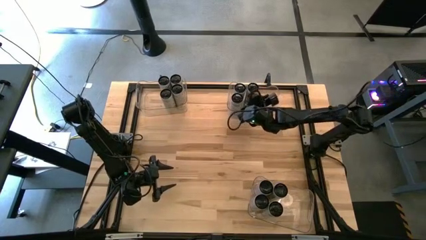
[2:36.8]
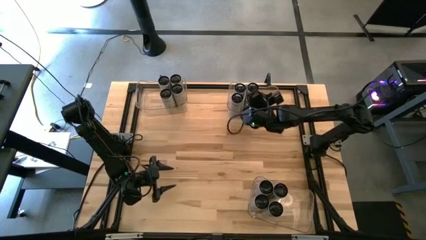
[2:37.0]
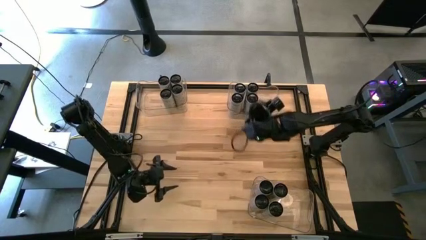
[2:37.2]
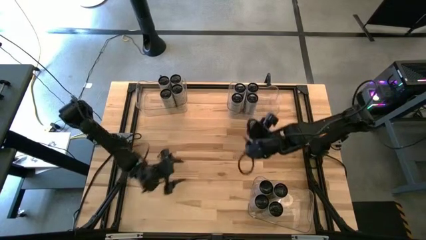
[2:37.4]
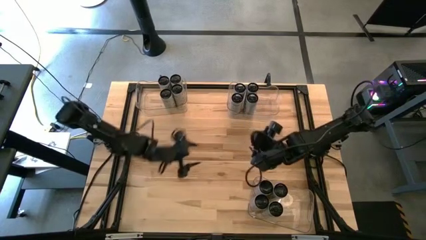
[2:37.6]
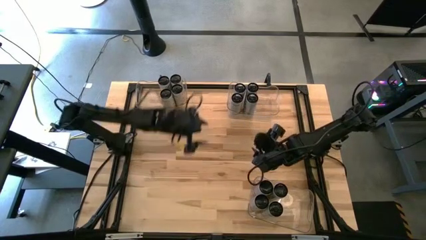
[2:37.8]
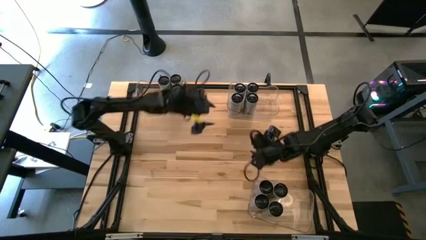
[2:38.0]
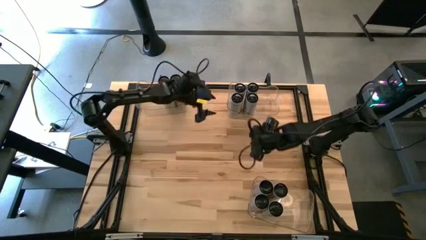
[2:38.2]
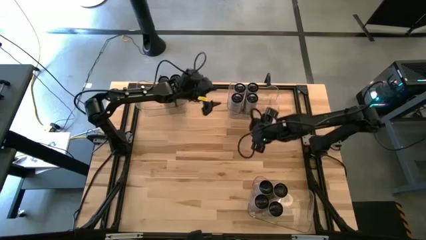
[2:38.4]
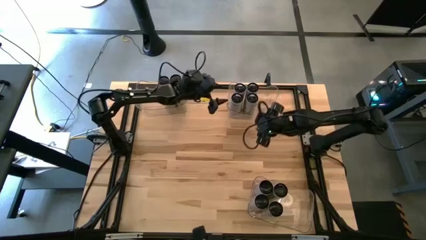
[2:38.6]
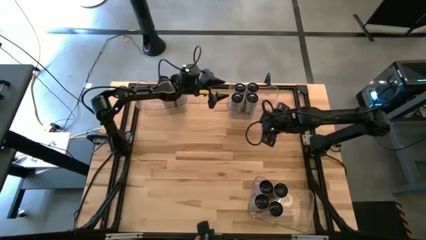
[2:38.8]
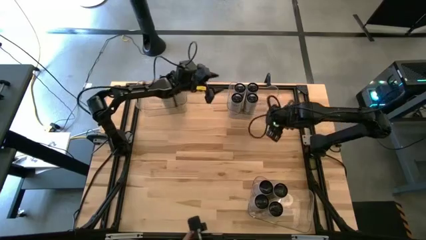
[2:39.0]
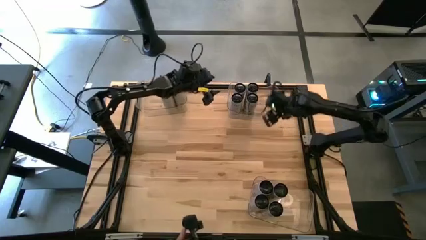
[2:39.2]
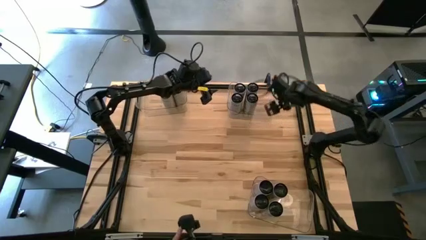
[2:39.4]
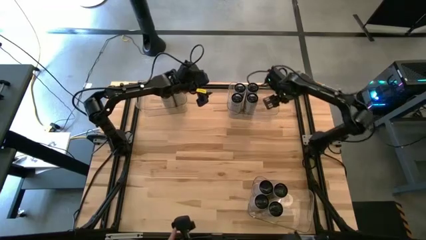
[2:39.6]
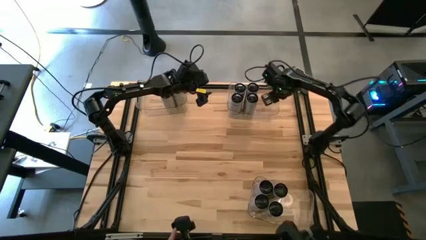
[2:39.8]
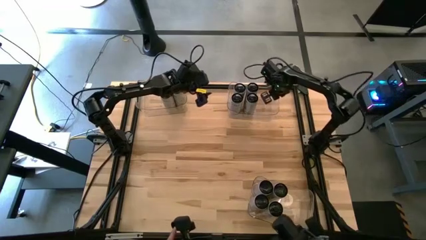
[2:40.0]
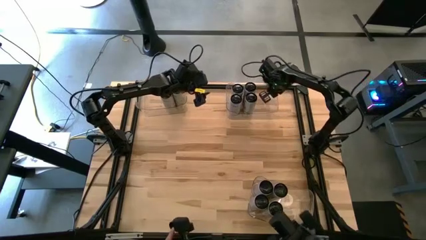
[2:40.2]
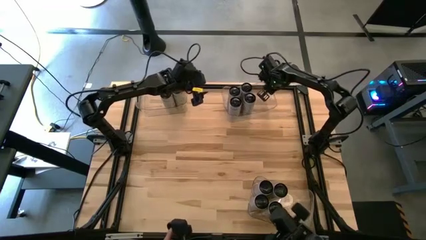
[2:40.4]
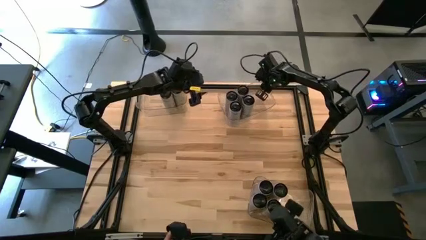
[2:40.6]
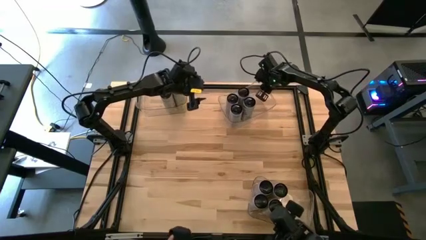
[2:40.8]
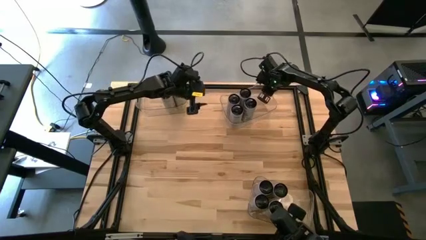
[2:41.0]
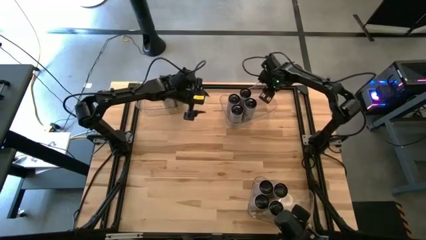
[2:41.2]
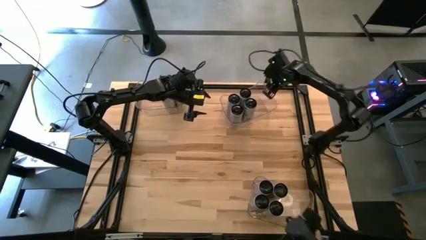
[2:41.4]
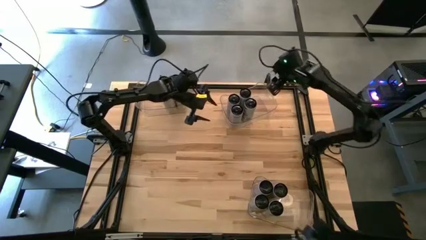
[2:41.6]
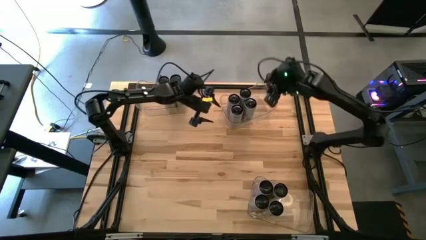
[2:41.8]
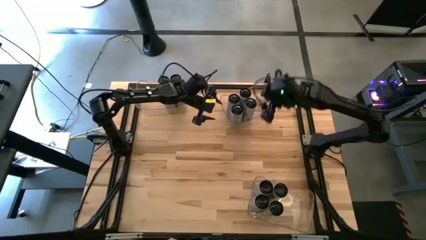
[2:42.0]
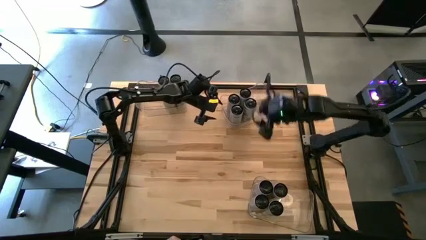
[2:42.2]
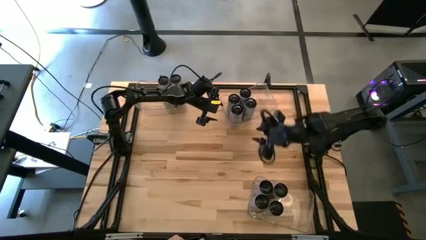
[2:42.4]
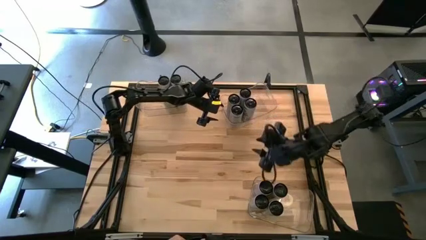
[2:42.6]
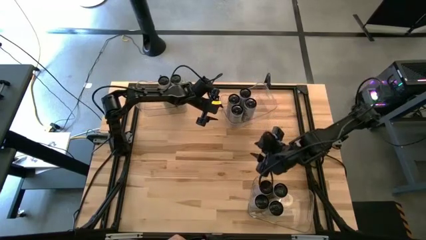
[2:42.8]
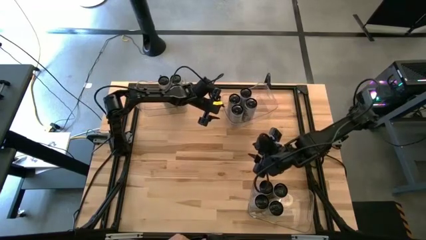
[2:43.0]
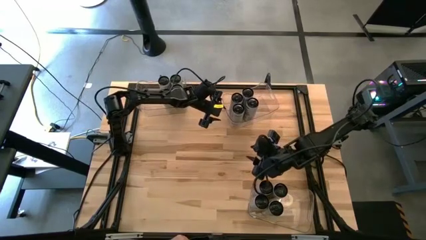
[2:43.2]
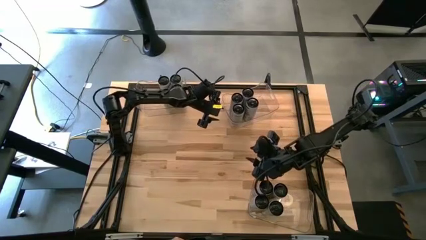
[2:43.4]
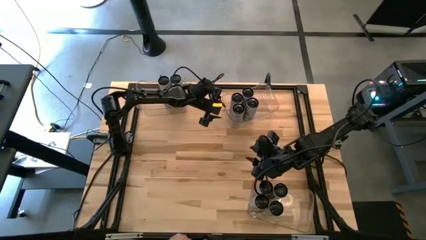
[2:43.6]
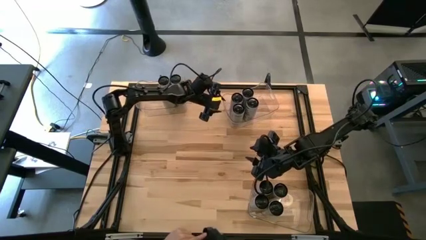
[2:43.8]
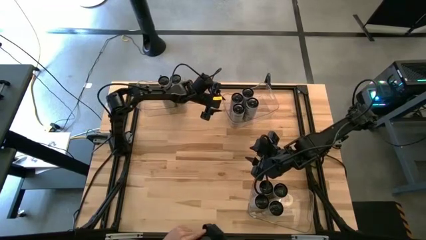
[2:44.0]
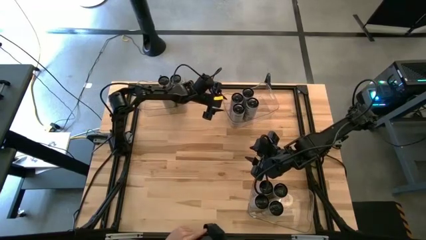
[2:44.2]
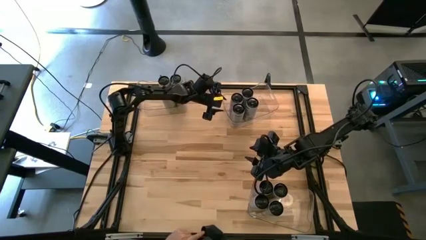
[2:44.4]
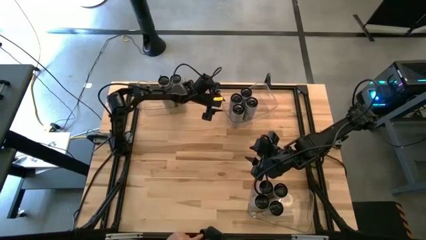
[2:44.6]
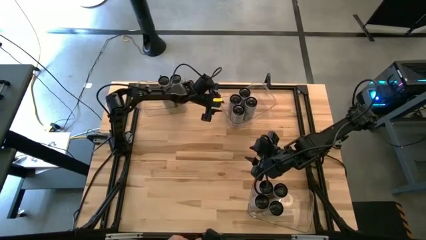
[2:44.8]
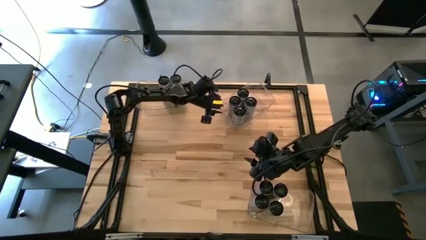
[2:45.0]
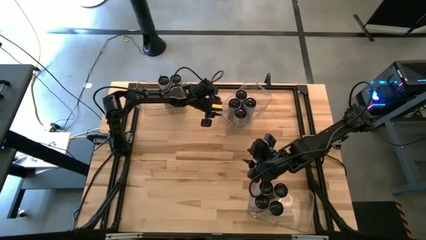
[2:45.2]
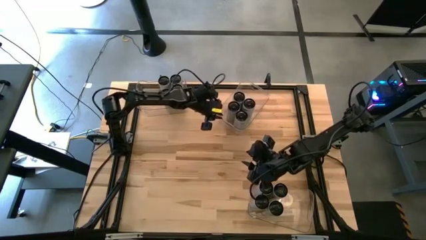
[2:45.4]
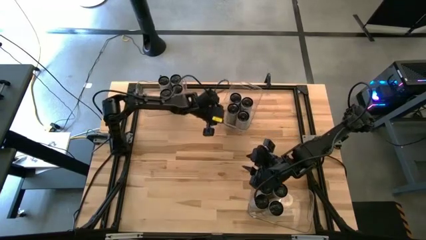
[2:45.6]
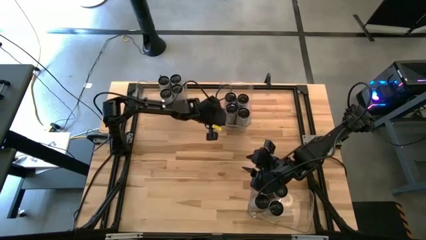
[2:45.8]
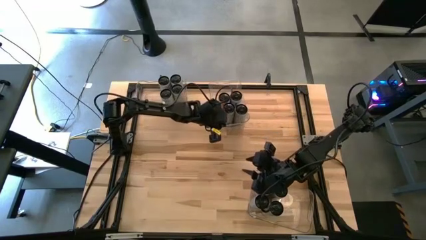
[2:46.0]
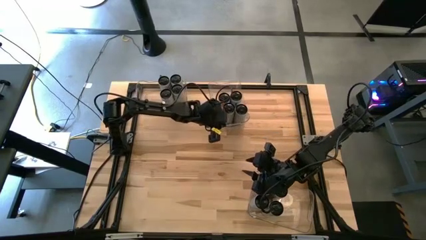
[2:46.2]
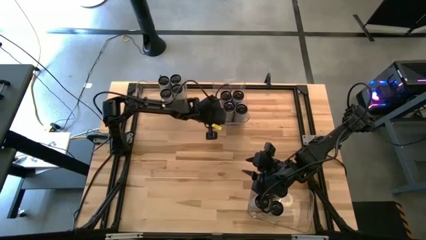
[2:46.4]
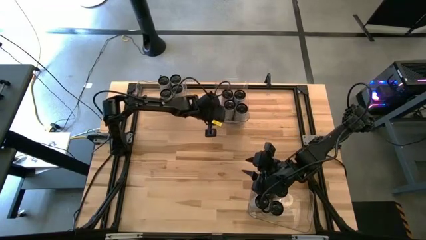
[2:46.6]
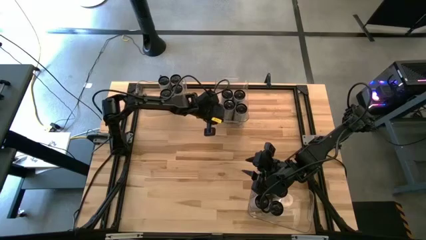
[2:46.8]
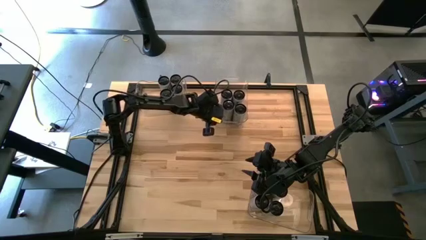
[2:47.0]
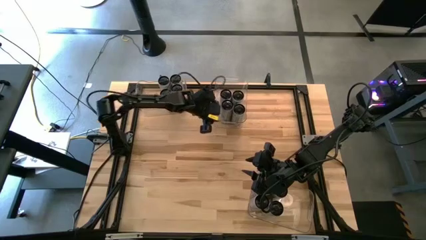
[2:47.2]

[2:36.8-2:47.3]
Task: Sort soda cans
Adjust the top center transparent bin

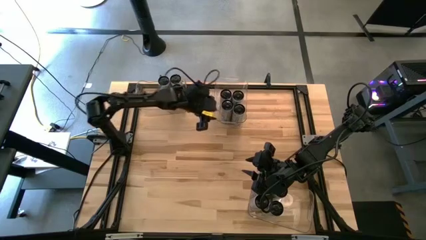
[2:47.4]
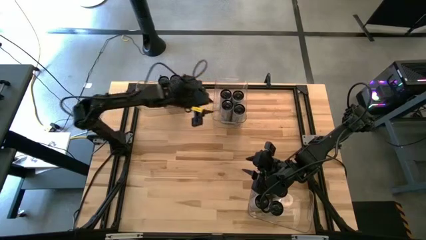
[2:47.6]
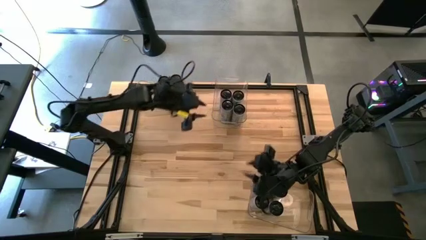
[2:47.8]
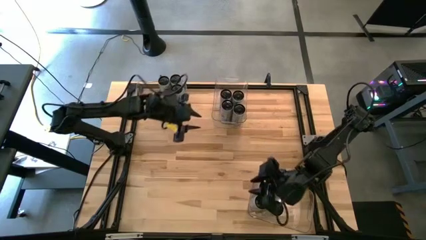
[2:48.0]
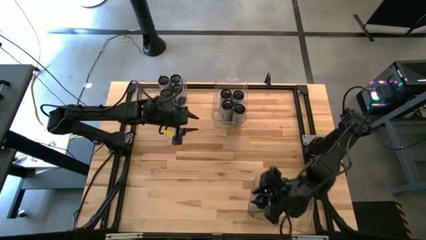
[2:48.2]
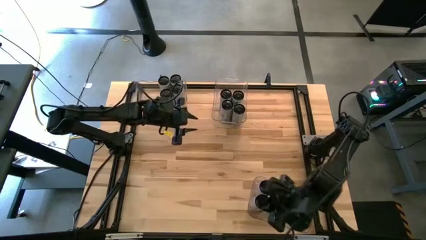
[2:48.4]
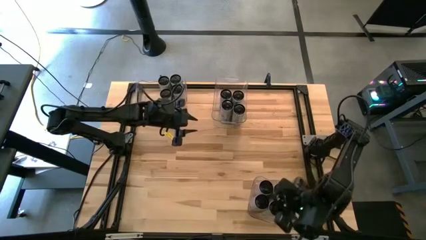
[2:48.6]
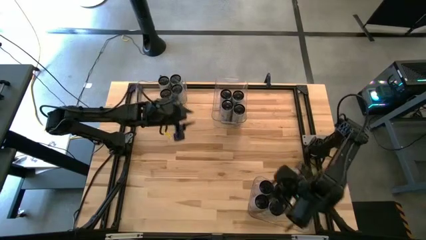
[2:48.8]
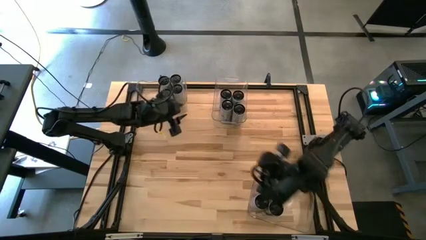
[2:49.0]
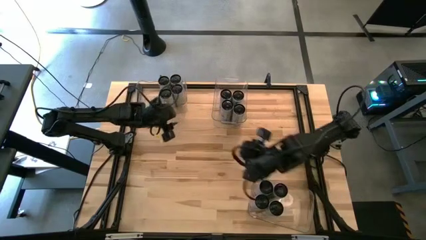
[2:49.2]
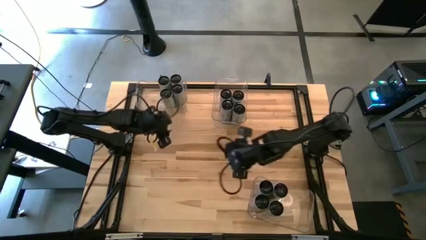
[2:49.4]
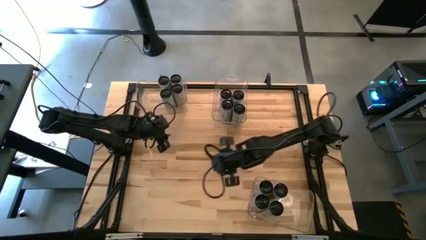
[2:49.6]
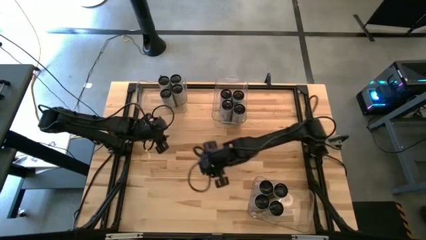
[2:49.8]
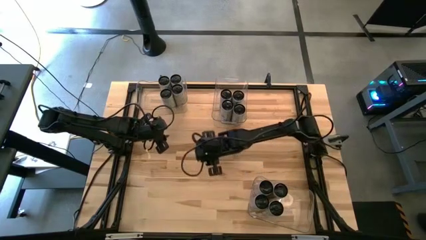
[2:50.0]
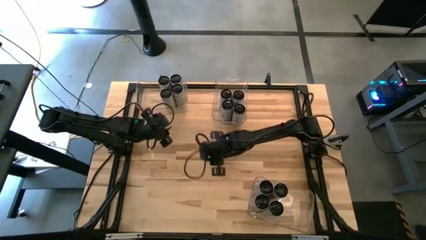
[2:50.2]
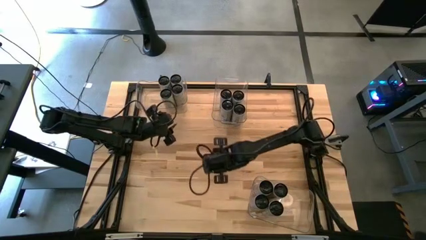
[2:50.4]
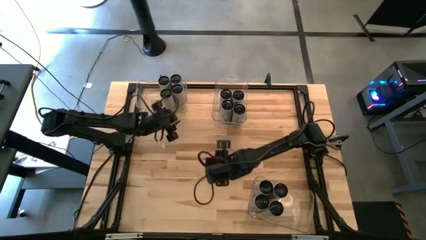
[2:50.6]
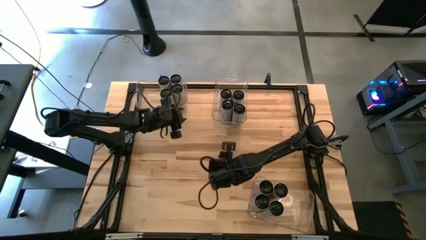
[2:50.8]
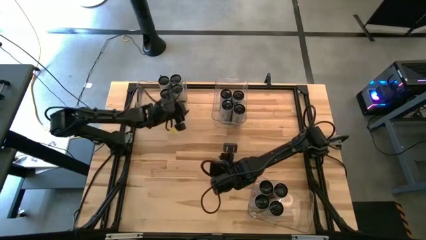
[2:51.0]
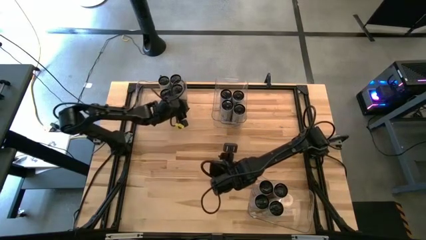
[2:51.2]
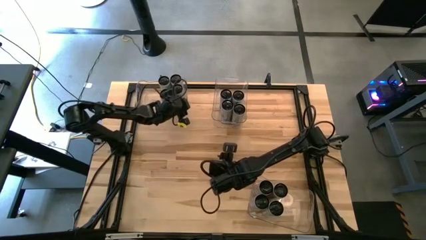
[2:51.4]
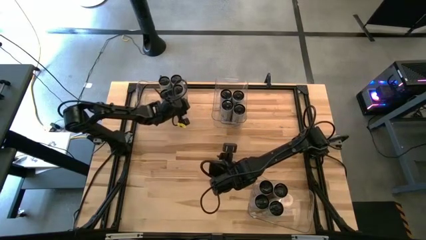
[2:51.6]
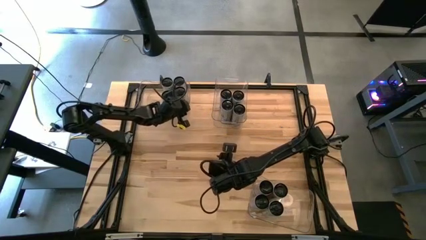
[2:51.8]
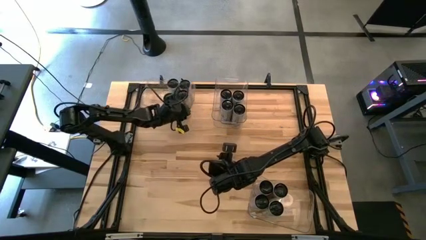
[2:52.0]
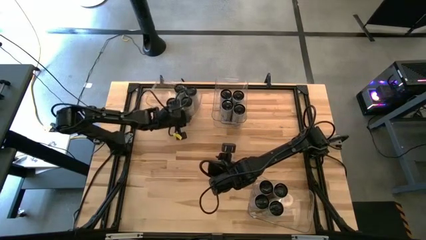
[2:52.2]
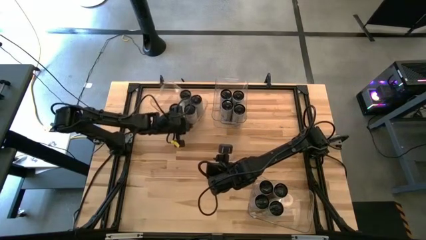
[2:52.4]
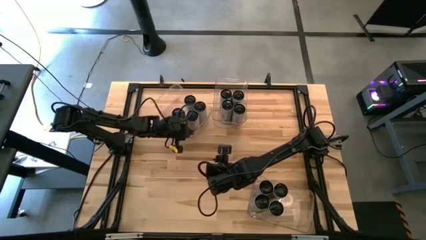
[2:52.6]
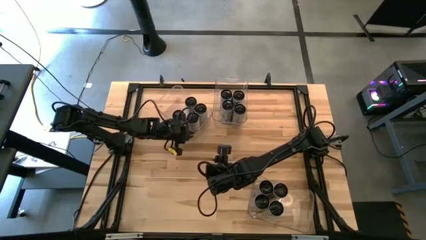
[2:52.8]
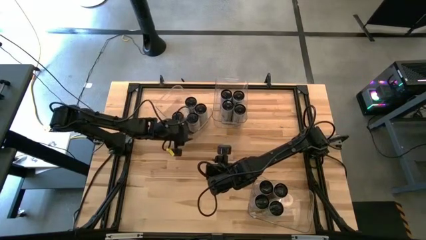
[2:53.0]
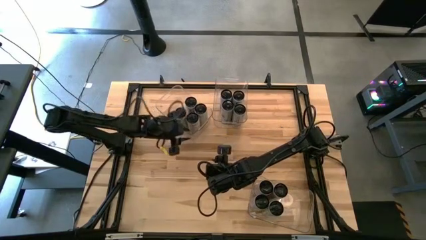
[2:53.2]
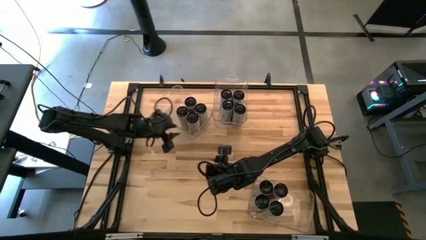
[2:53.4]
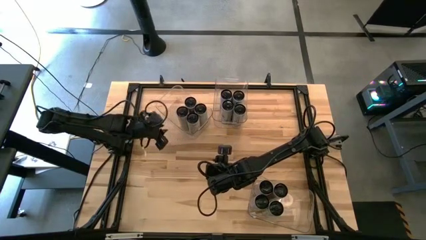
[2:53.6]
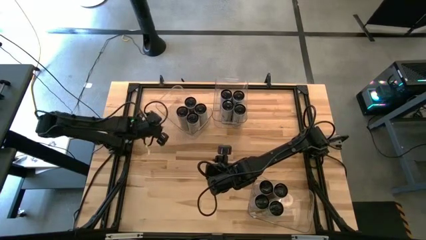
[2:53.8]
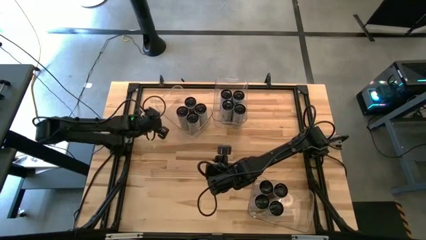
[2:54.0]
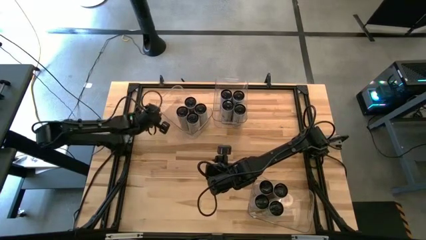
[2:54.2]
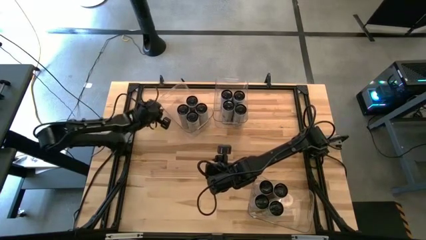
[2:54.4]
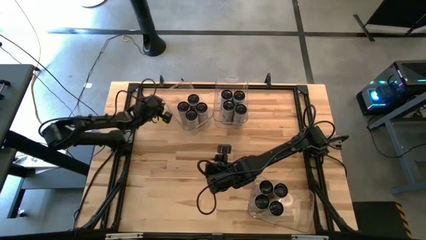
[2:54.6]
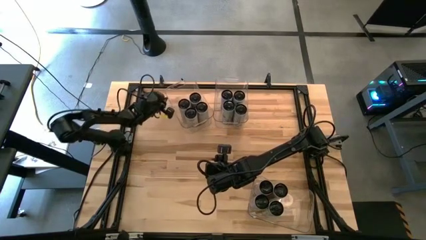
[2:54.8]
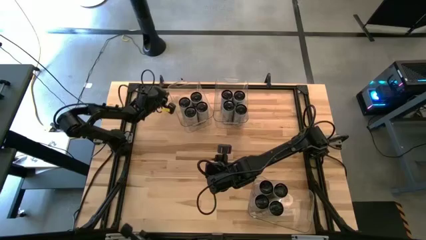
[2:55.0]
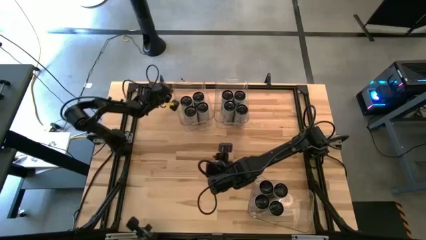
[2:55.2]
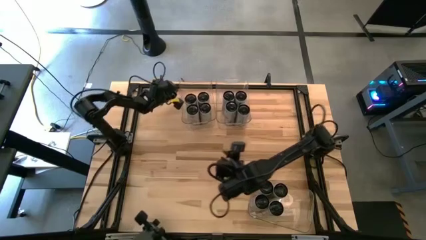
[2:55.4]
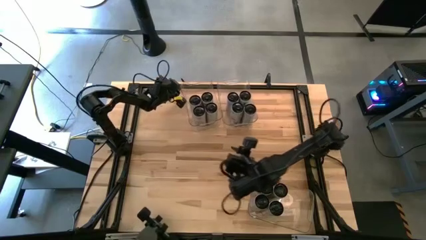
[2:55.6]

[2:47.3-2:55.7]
Adjust the top left transparent bin
